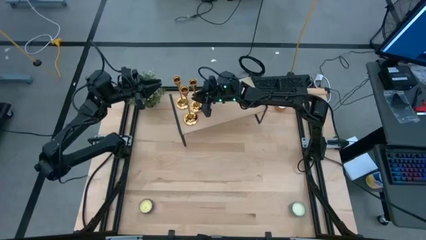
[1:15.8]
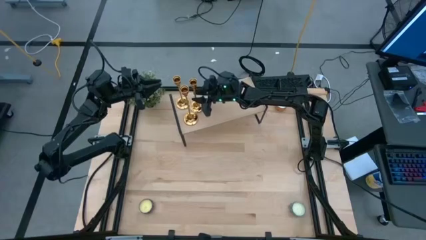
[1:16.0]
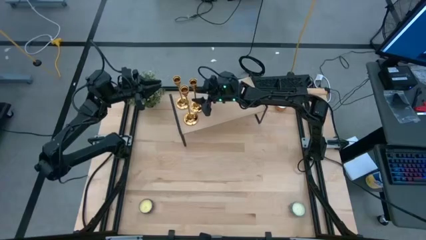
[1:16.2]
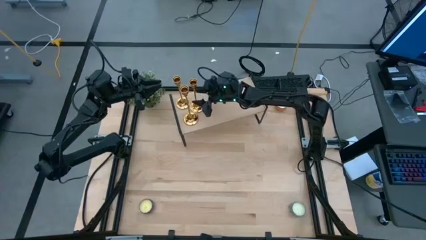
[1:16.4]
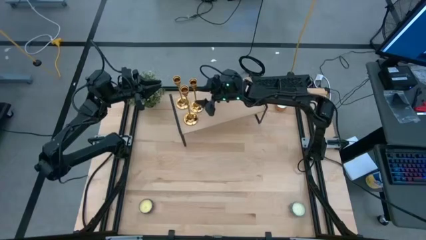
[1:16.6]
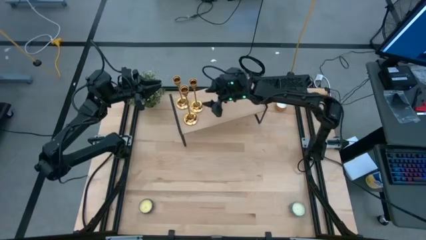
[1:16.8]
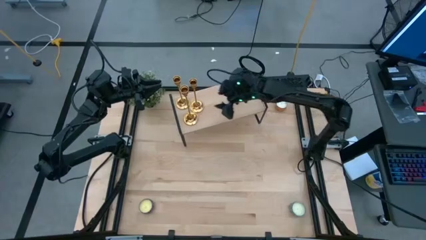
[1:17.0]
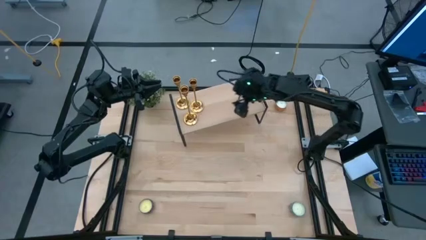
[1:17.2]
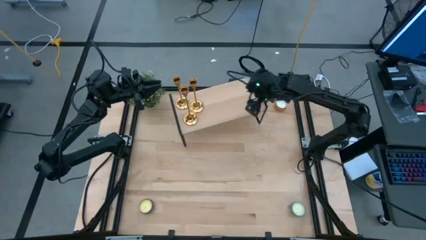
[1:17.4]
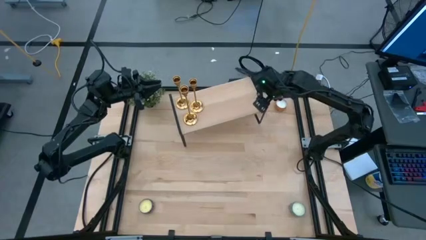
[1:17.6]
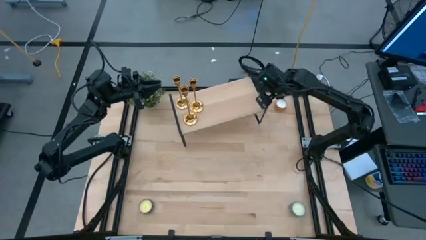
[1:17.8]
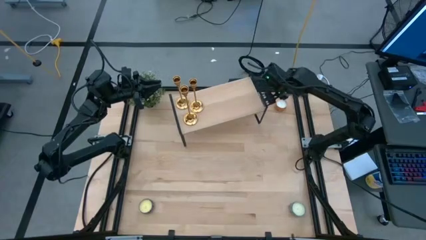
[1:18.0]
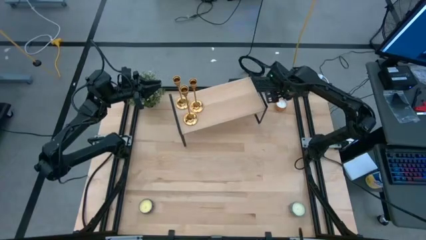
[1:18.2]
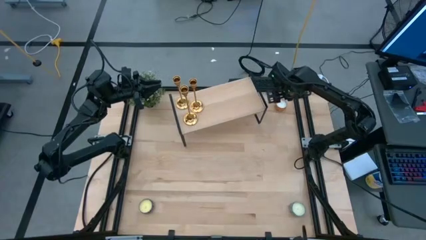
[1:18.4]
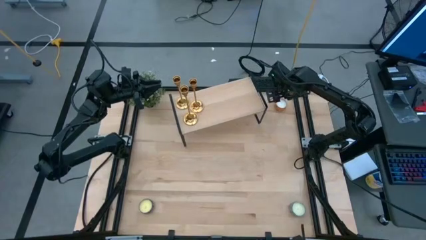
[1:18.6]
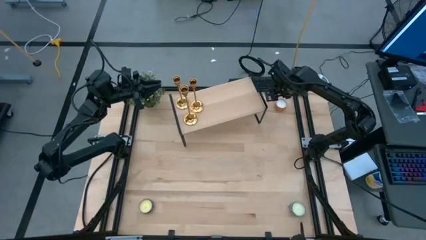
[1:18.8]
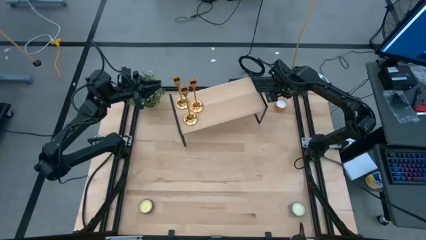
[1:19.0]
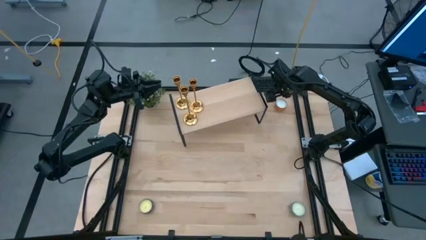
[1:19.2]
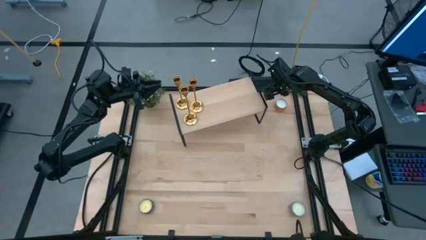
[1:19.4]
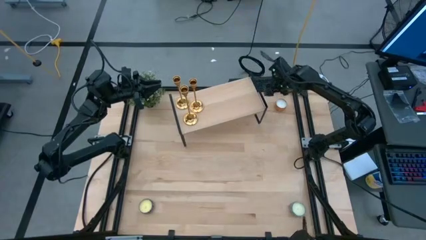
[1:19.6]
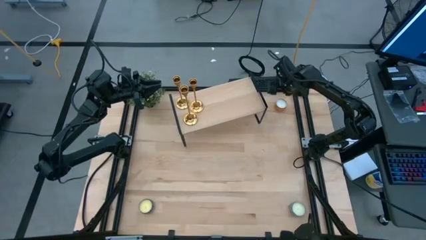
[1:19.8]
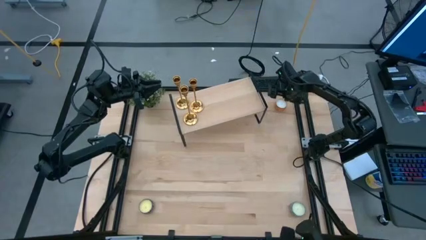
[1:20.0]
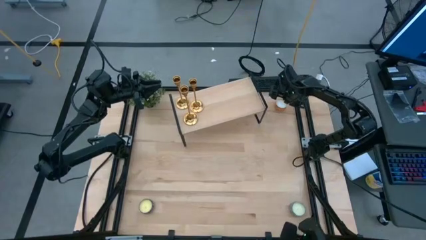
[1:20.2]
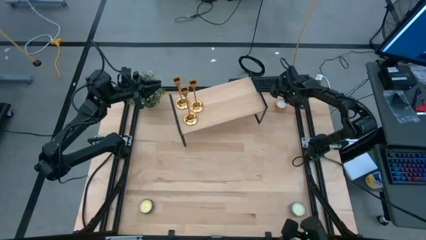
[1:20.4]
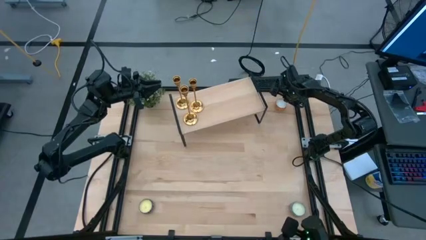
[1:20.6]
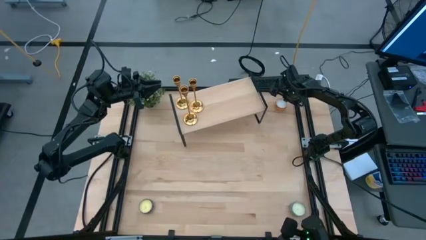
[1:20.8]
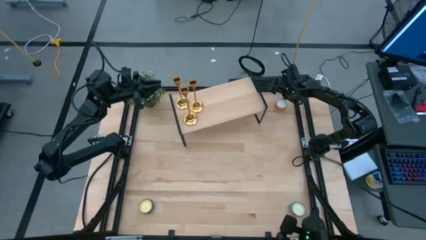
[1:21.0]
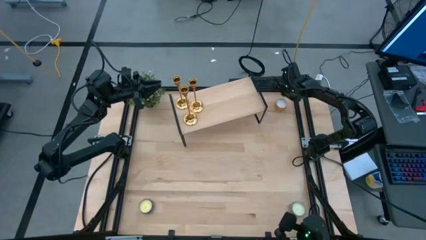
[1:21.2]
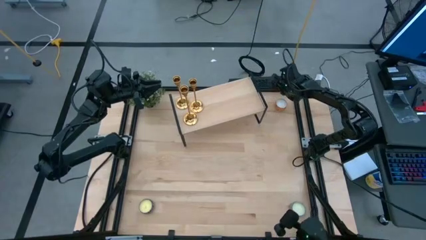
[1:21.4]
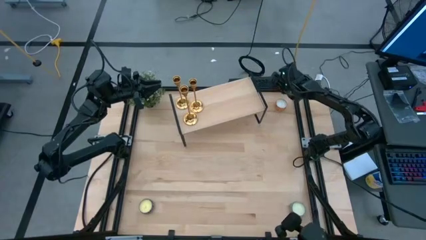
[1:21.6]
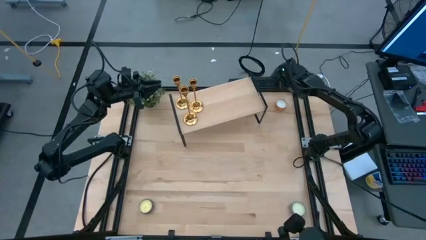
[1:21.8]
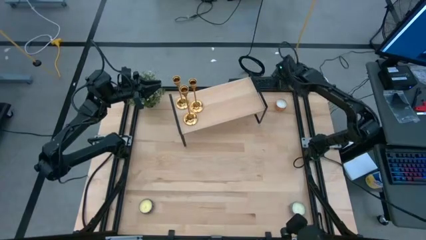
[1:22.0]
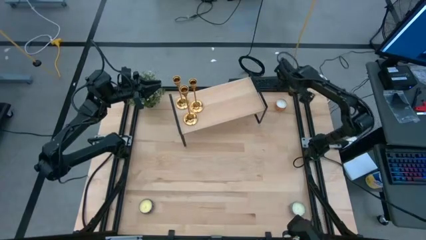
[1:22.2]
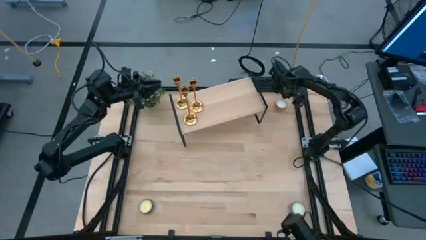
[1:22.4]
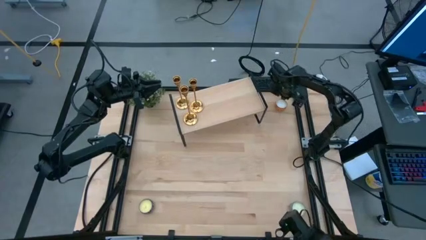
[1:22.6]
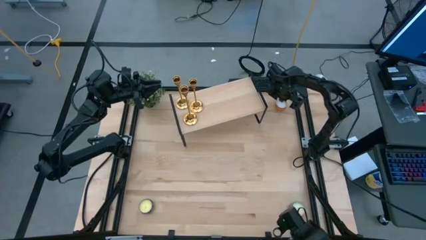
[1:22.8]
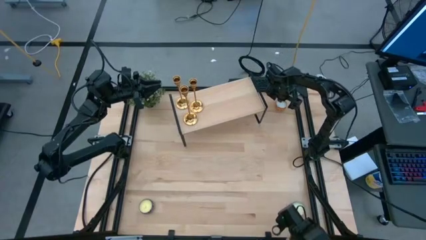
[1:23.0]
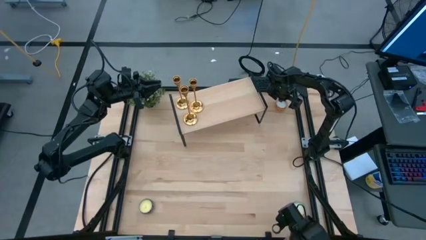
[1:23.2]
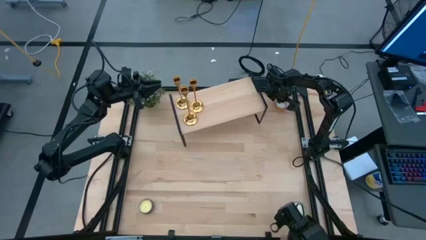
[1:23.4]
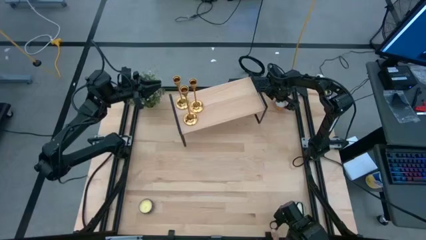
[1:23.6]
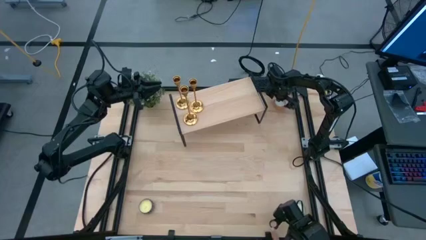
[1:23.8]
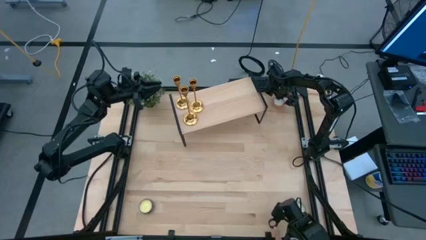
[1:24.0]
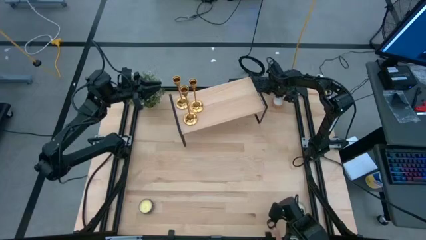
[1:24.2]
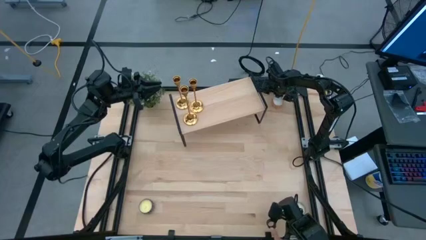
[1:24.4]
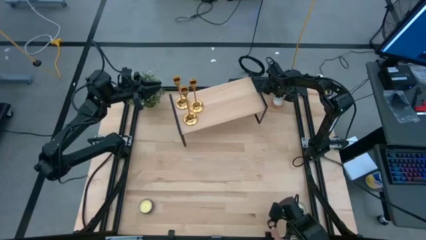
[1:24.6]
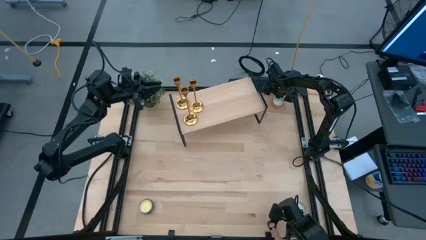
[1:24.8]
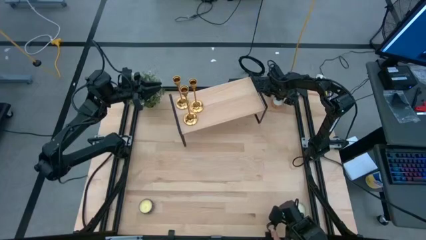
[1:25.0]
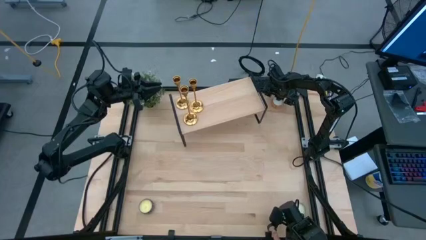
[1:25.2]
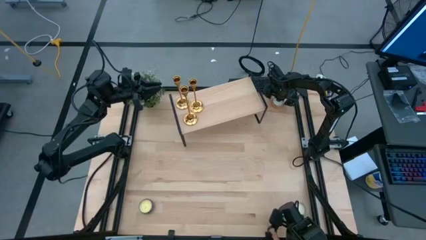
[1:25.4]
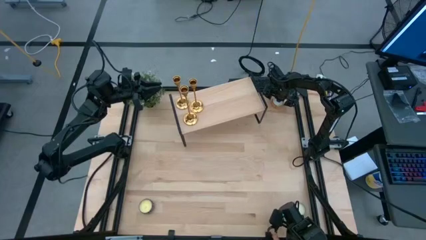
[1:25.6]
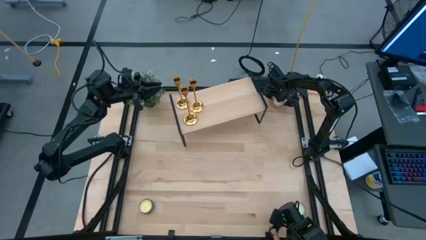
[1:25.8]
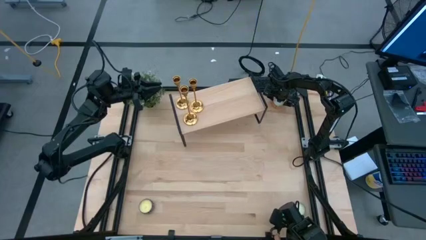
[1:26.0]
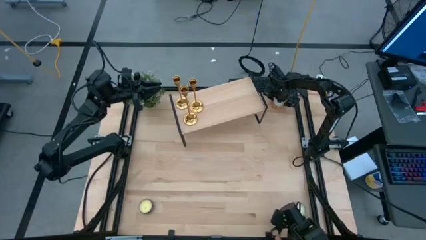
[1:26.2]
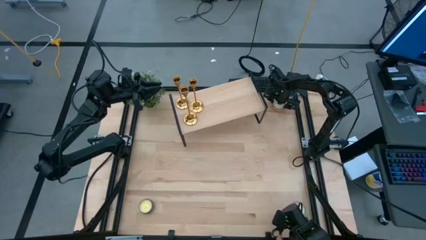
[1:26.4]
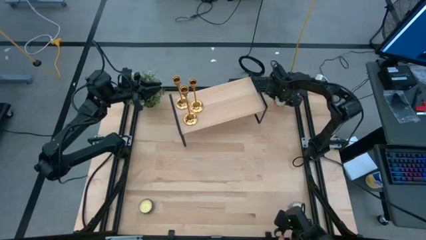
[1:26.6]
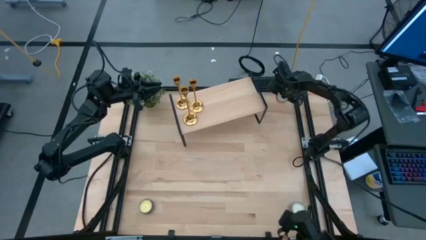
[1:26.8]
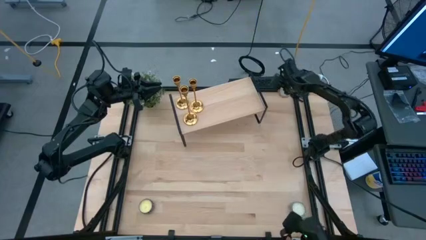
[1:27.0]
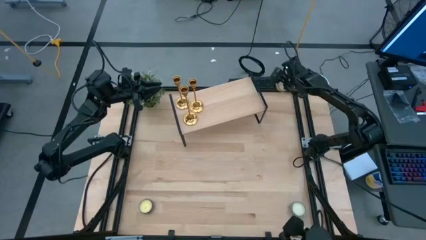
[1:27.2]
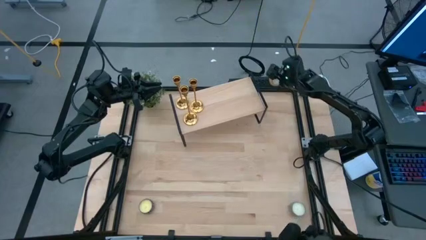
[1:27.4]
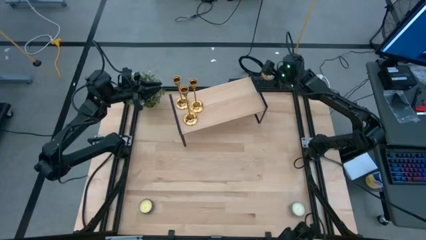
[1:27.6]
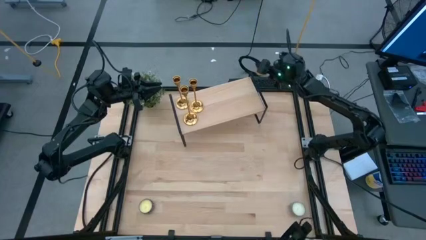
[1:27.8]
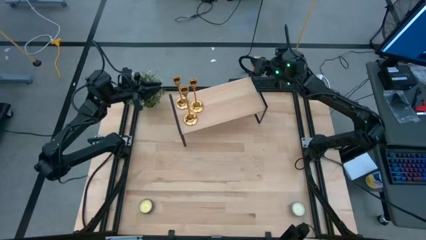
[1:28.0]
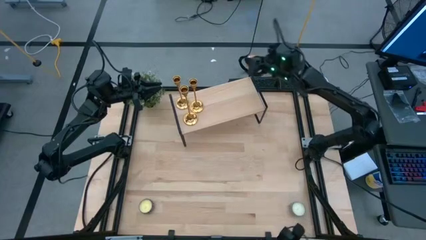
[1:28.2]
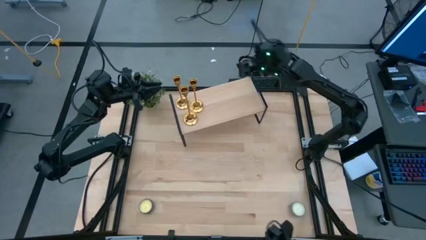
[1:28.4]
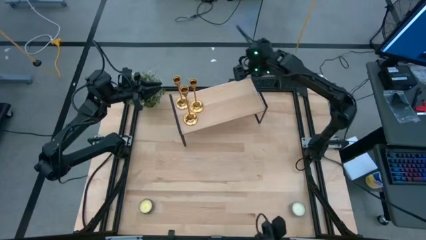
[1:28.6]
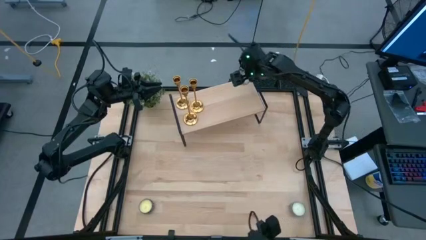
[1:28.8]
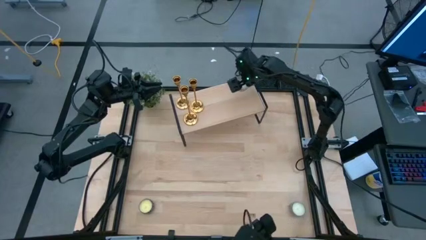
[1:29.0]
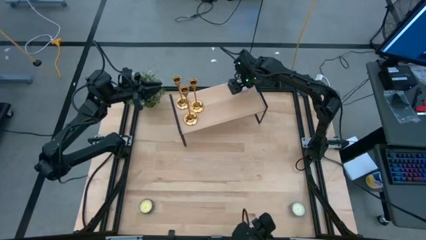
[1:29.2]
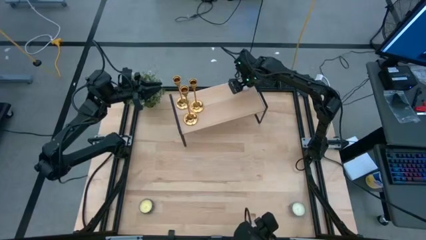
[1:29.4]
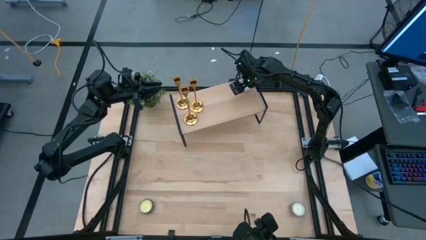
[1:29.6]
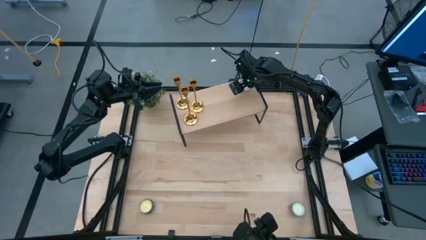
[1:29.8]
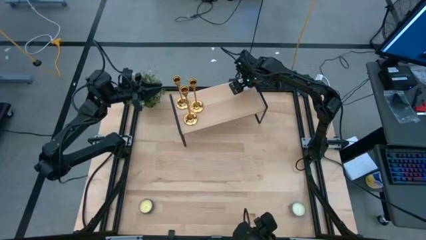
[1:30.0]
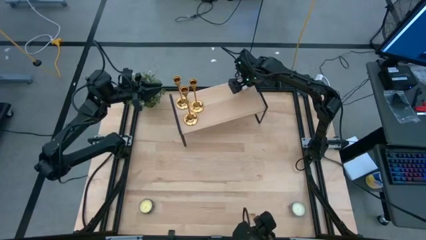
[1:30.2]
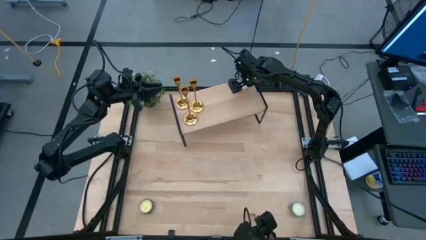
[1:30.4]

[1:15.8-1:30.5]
Task: Pick & Place candle stick holders
Put the orange scented candle on the shelf
